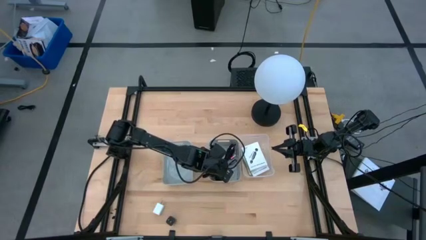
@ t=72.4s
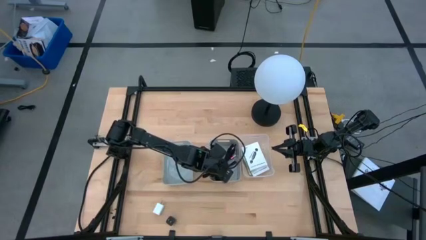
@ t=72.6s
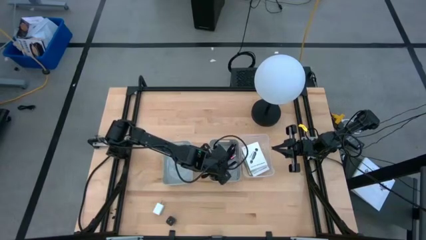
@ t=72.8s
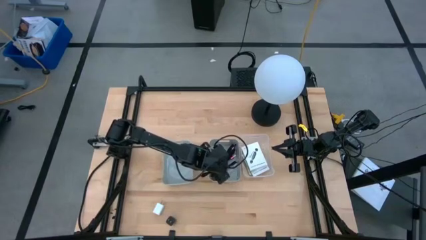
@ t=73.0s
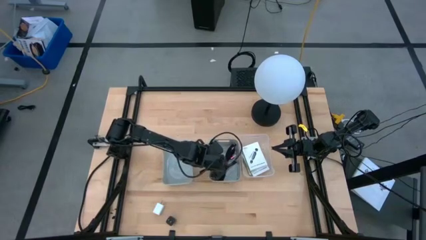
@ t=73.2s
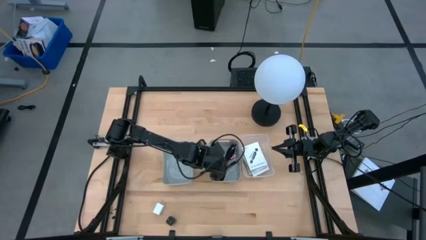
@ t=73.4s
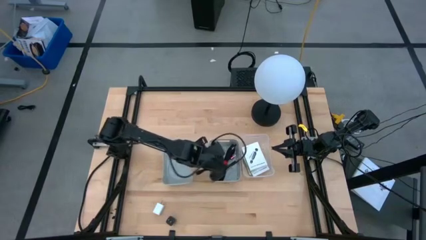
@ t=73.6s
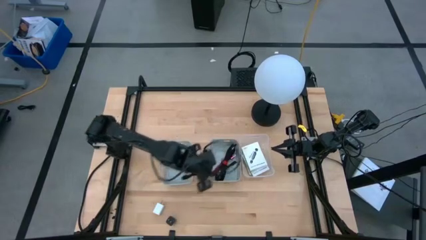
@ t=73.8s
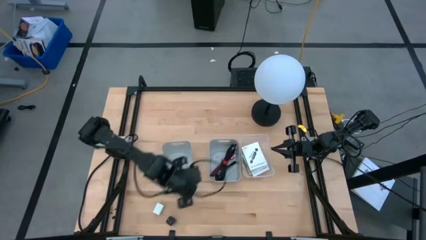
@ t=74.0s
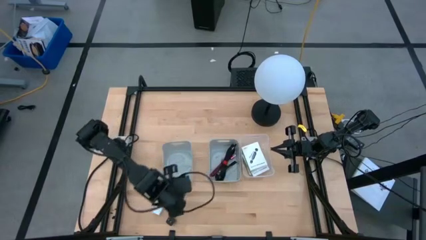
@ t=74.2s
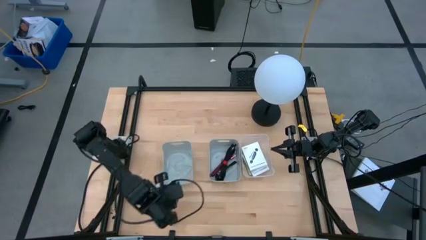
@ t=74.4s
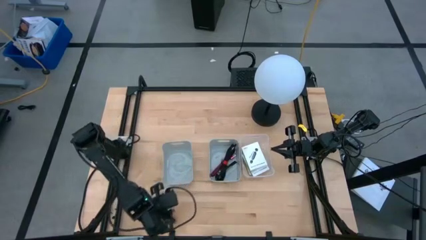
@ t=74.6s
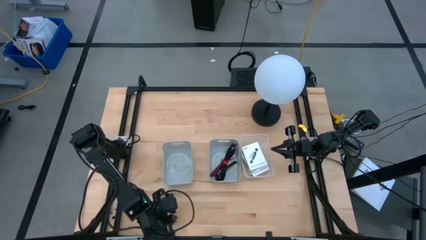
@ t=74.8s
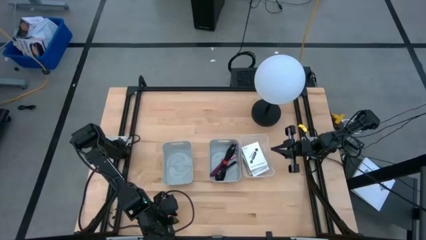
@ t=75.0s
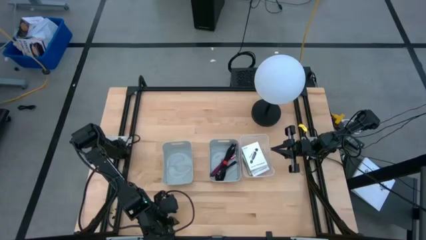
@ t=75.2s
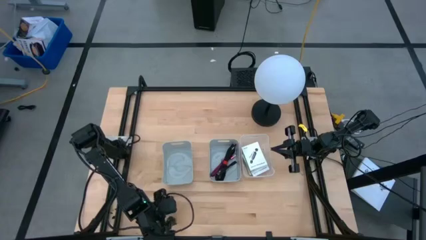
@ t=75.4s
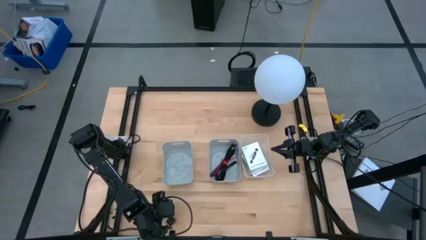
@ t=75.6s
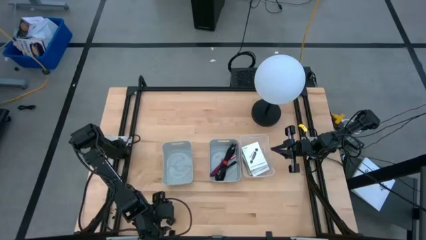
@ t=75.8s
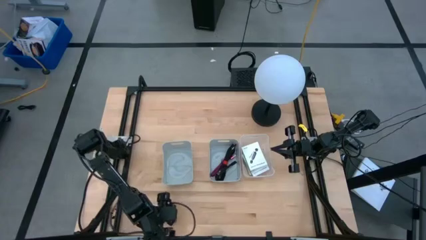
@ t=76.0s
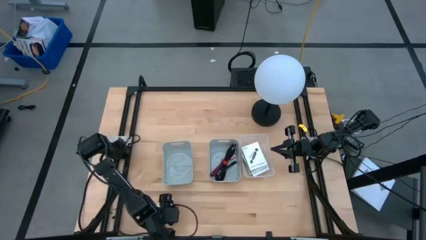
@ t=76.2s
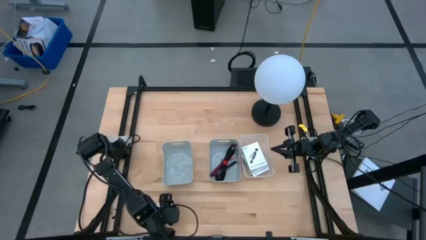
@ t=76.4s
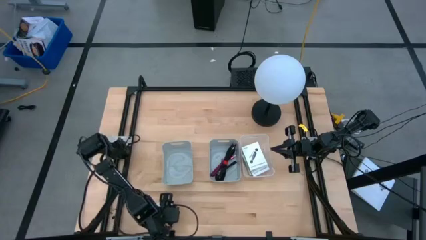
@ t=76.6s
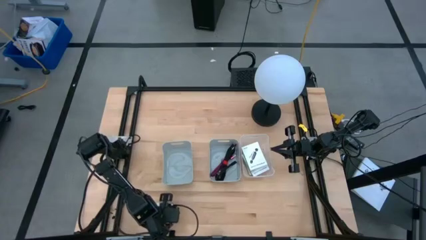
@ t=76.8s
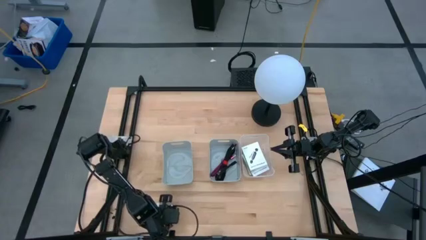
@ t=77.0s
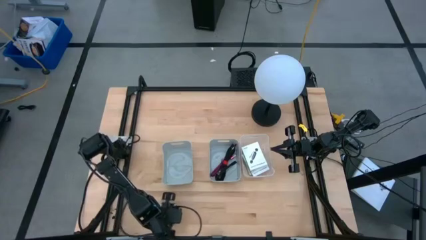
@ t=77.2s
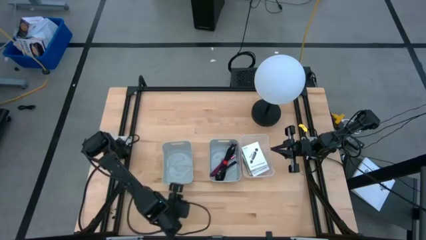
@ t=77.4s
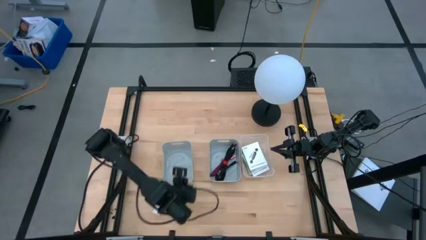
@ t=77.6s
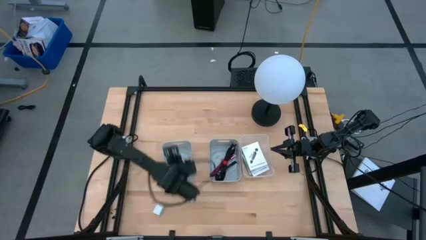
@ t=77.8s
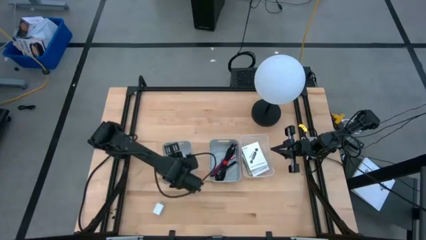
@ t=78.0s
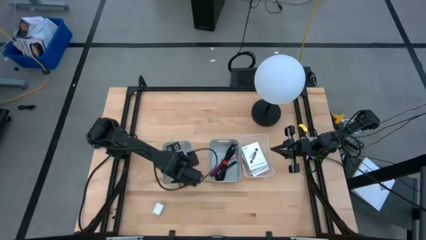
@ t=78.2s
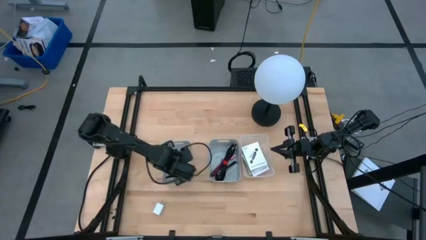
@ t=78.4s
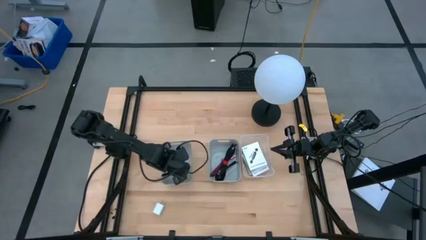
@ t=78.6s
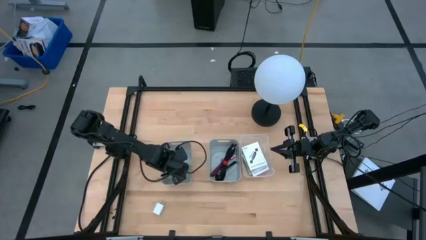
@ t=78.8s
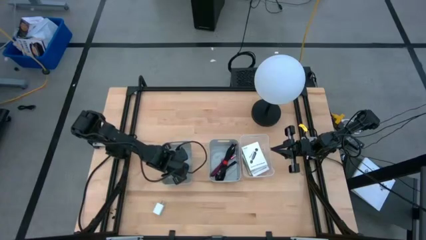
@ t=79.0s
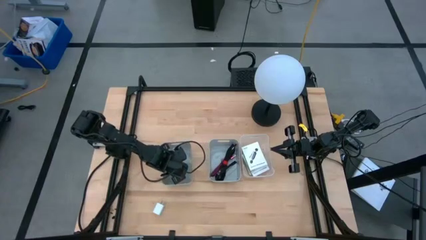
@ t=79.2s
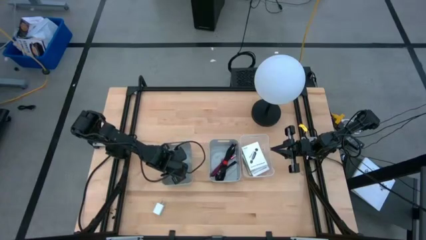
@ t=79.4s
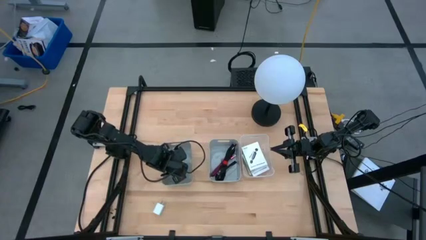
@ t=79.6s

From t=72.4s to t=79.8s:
Task: Pick and place items into bin
Put the black charger adapter into the left gray bin

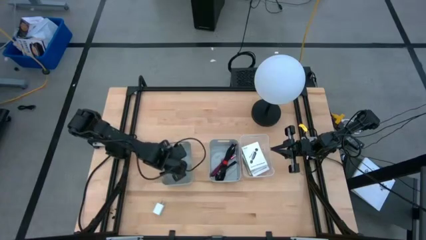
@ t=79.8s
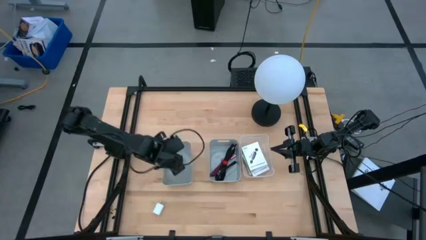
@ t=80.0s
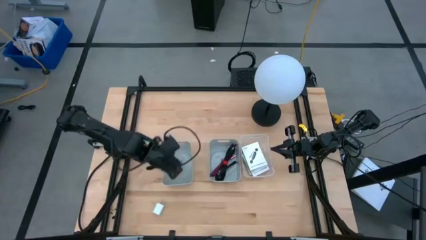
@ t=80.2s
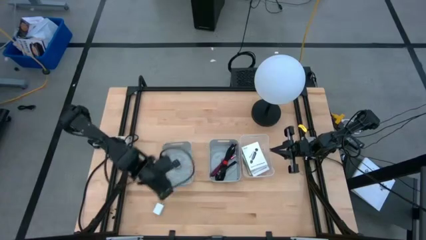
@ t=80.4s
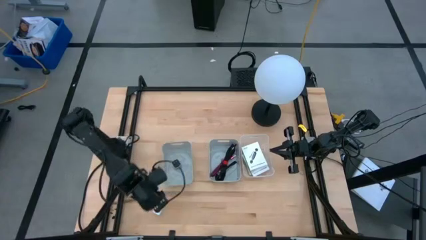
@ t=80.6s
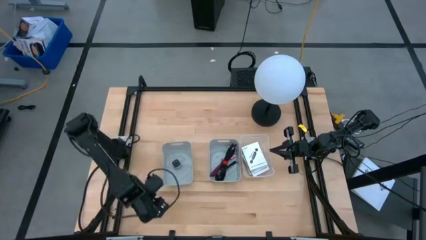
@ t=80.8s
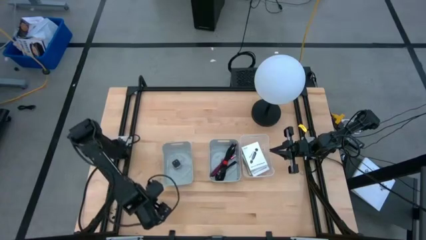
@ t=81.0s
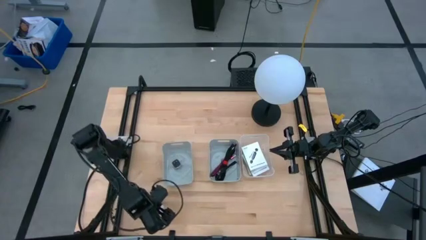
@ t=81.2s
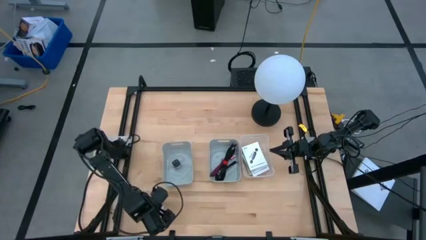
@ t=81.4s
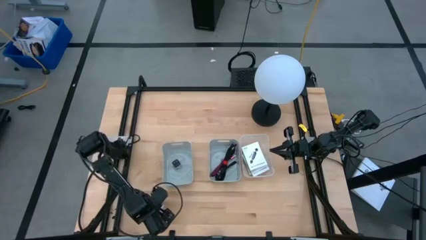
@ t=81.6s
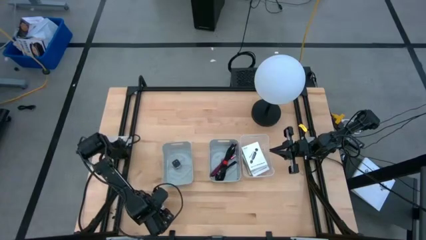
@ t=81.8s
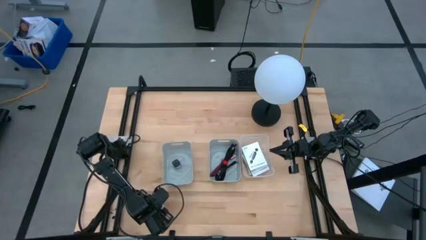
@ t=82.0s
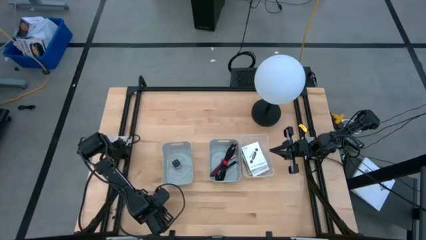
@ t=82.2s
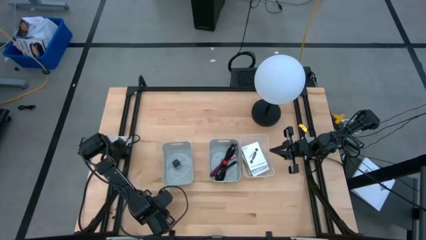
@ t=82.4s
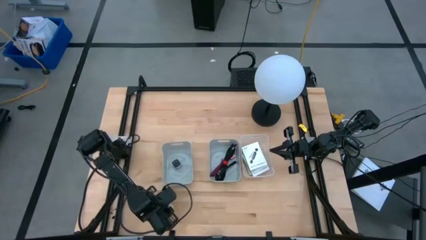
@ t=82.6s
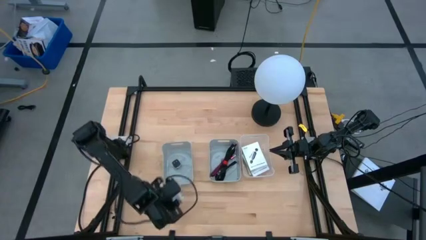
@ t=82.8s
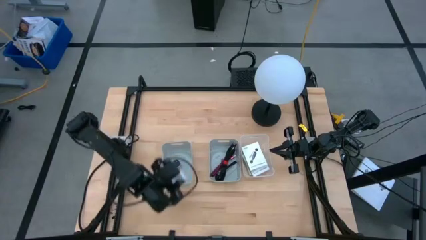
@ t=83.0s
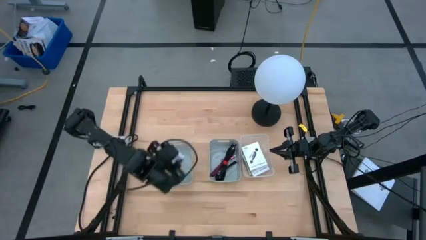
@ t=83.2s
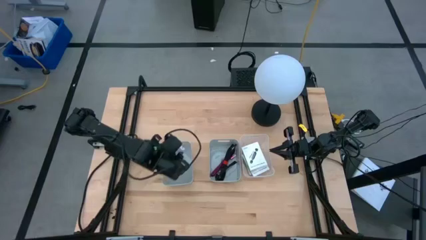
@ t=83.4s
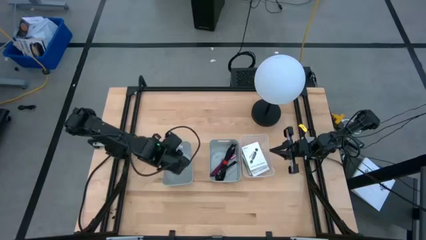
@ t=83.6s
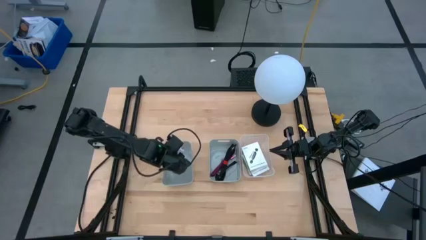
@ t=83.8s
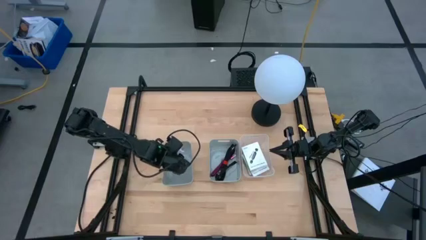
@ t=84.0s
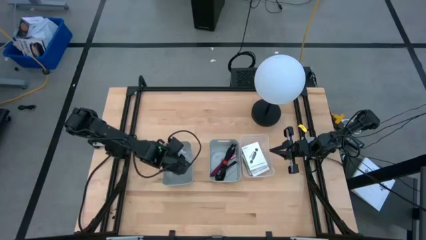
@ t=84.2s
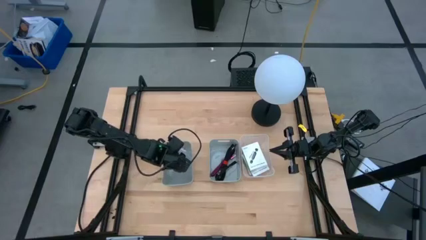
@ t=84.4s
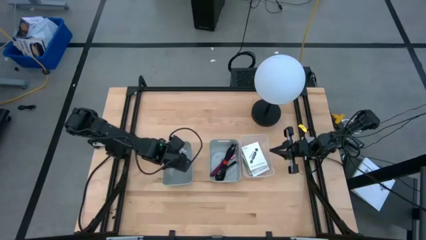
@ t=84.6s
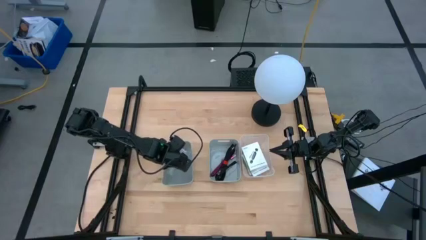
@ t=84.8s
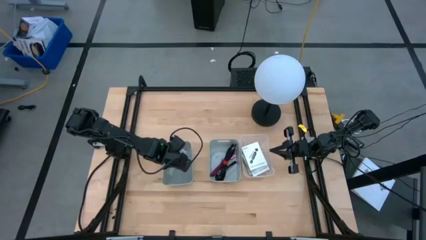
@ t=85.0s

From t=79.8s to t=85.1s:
Put the white charger adapter into the left gray bin
